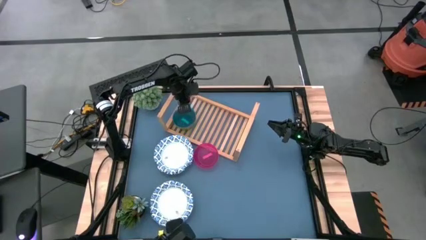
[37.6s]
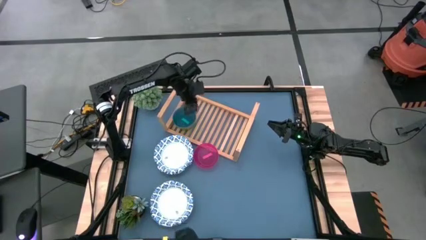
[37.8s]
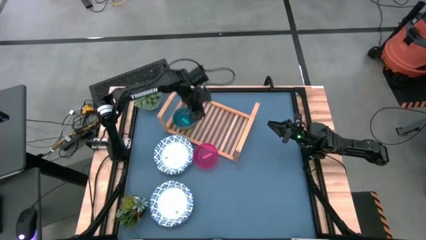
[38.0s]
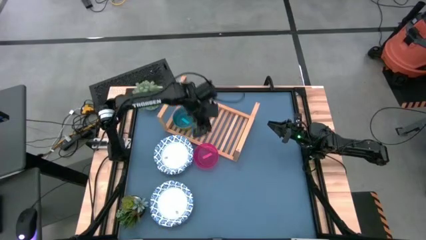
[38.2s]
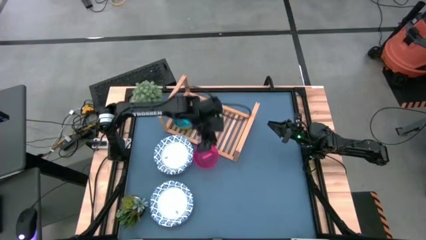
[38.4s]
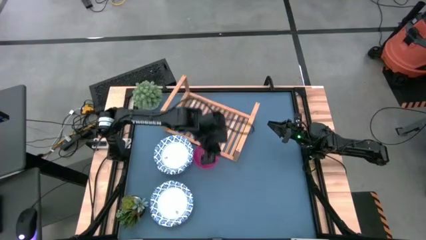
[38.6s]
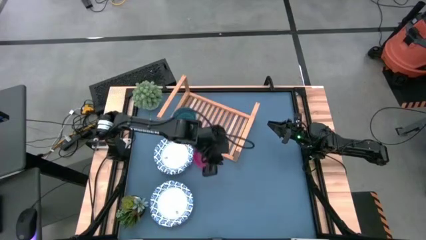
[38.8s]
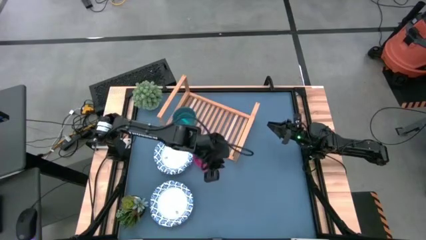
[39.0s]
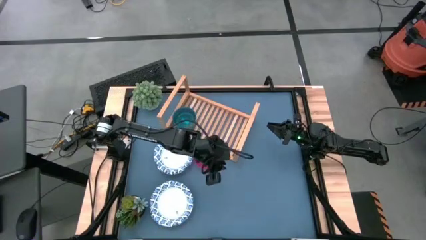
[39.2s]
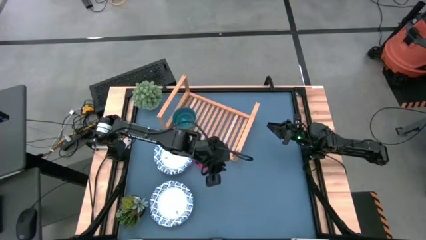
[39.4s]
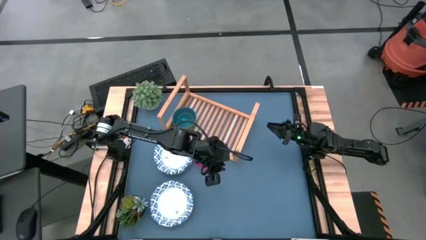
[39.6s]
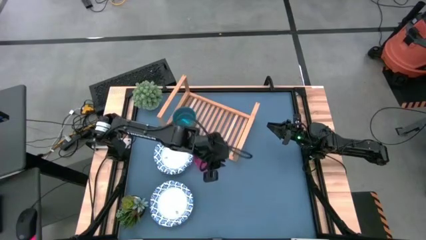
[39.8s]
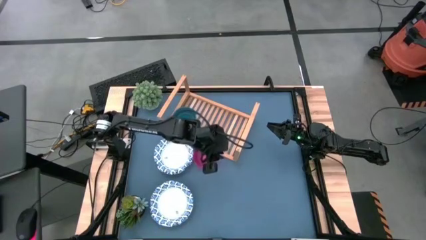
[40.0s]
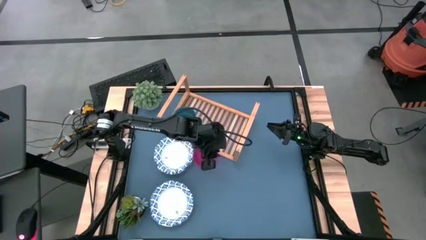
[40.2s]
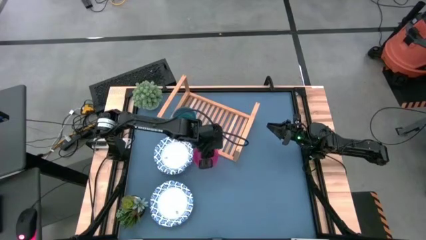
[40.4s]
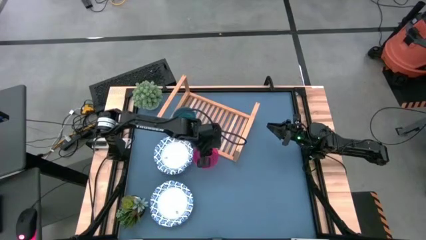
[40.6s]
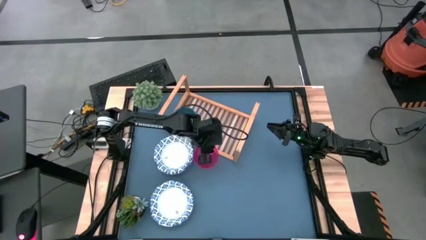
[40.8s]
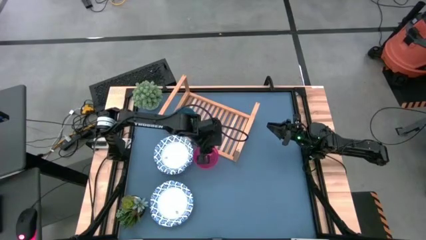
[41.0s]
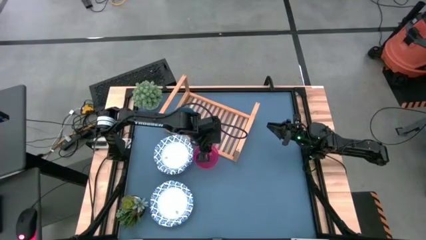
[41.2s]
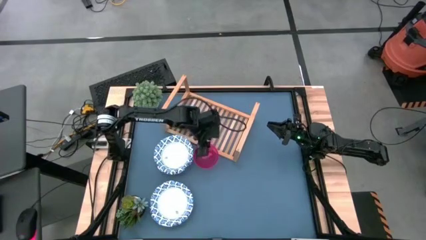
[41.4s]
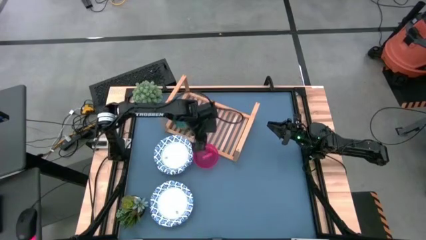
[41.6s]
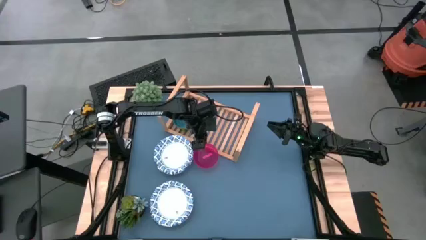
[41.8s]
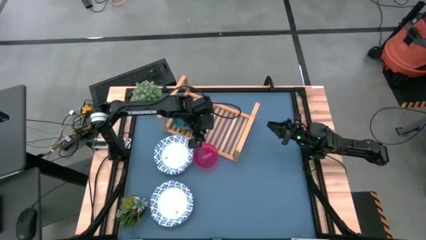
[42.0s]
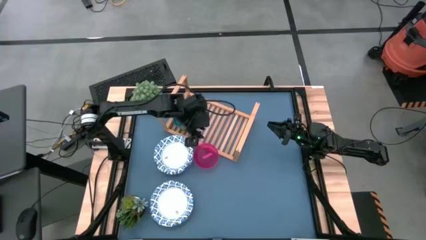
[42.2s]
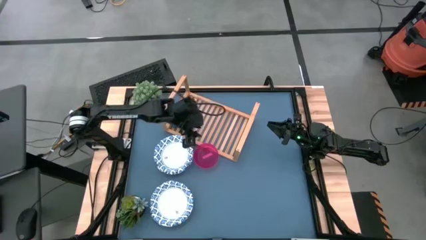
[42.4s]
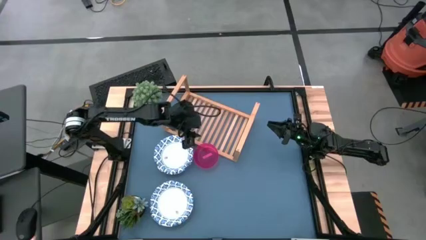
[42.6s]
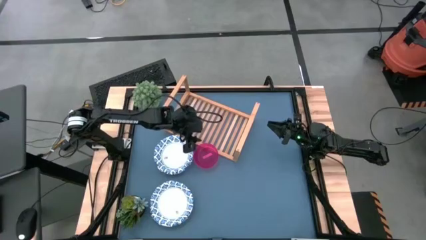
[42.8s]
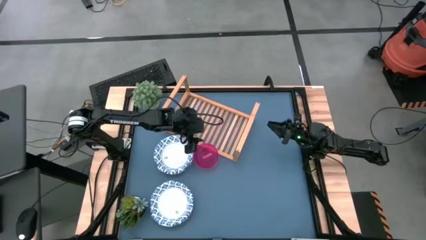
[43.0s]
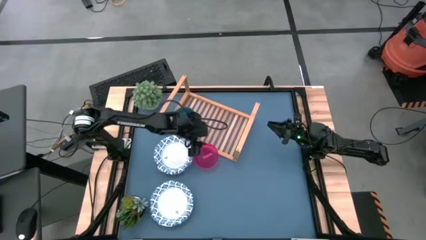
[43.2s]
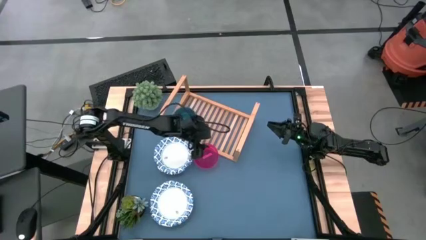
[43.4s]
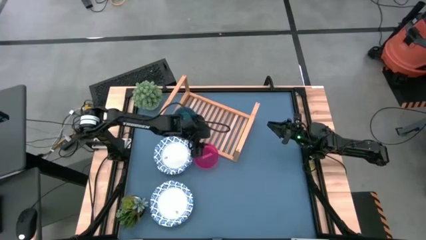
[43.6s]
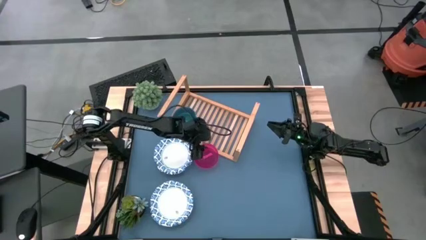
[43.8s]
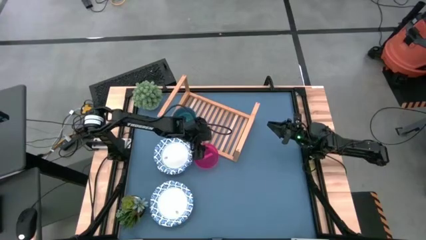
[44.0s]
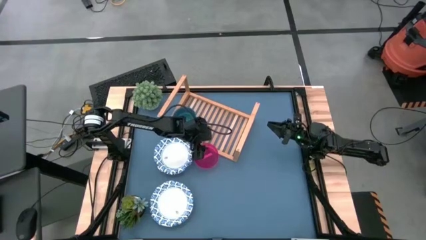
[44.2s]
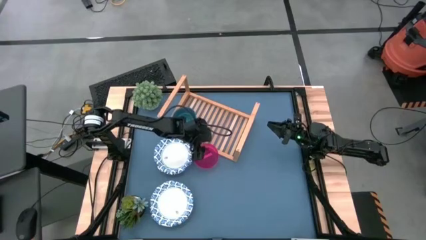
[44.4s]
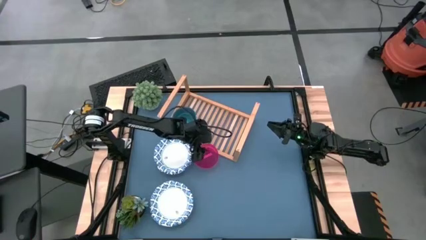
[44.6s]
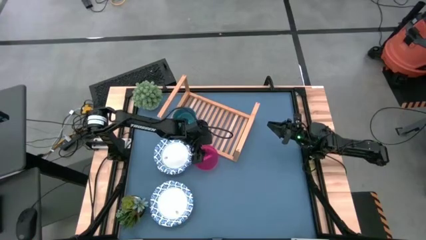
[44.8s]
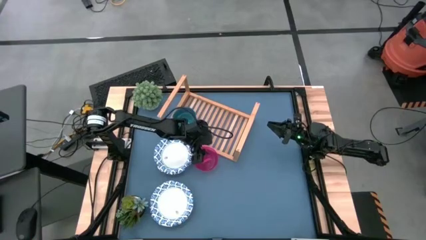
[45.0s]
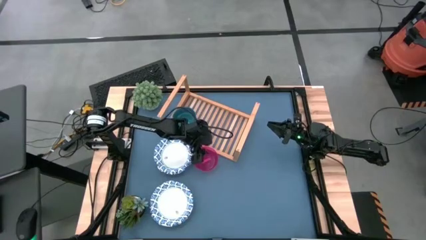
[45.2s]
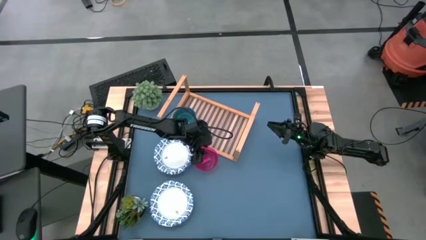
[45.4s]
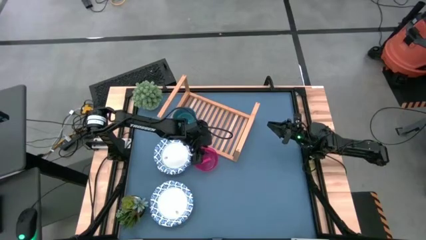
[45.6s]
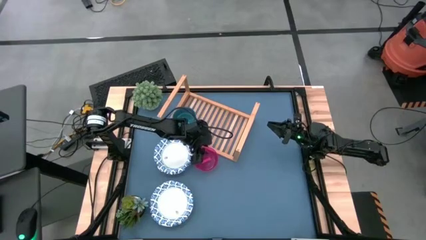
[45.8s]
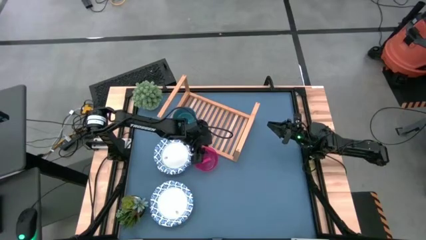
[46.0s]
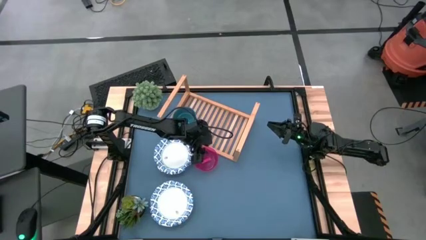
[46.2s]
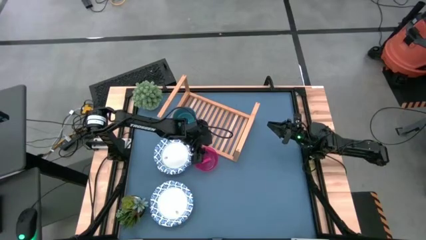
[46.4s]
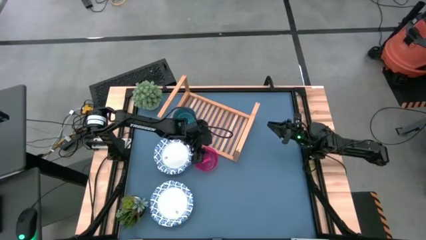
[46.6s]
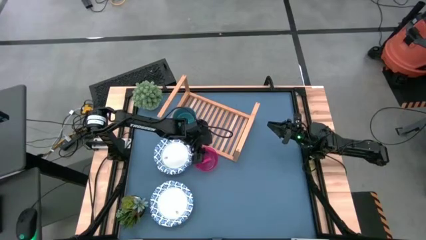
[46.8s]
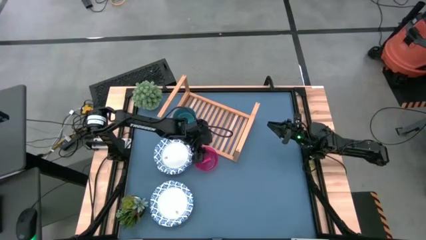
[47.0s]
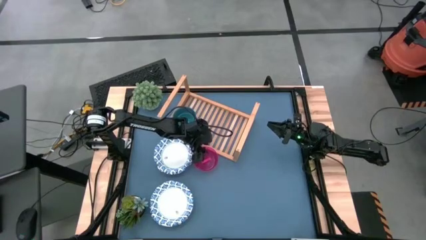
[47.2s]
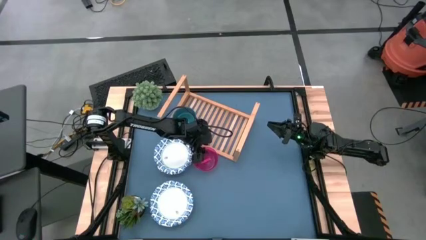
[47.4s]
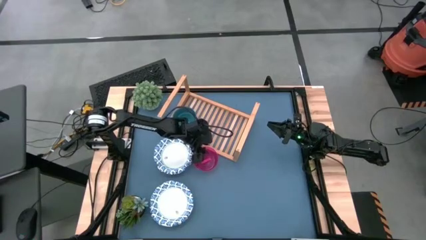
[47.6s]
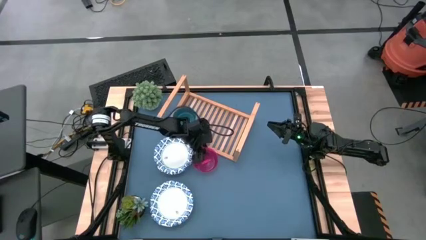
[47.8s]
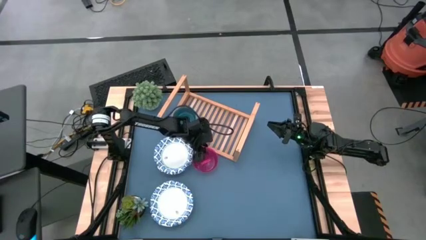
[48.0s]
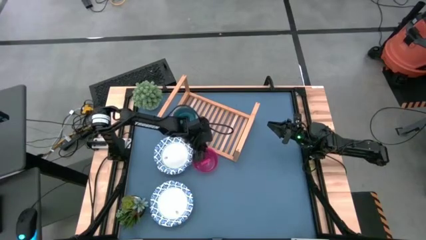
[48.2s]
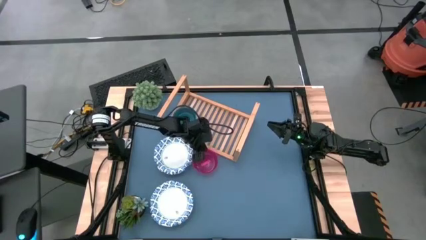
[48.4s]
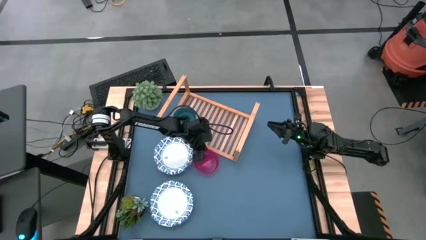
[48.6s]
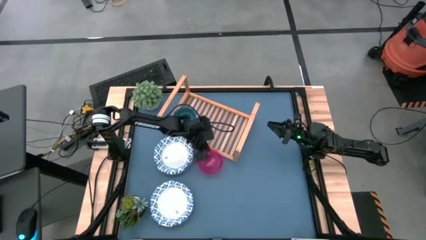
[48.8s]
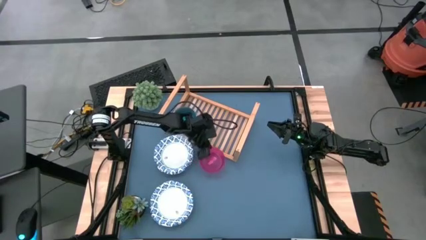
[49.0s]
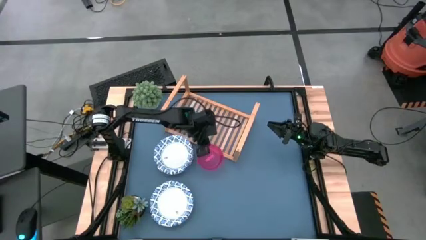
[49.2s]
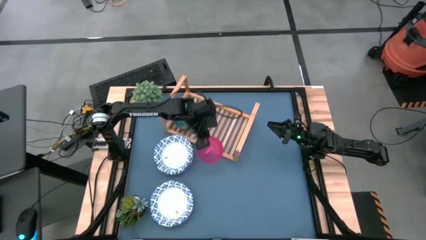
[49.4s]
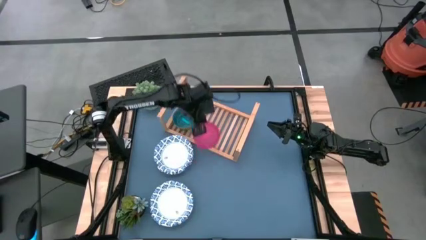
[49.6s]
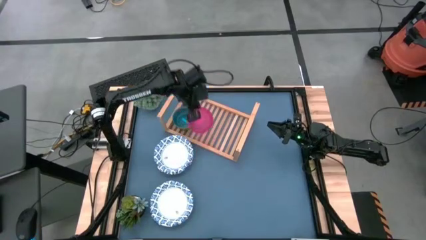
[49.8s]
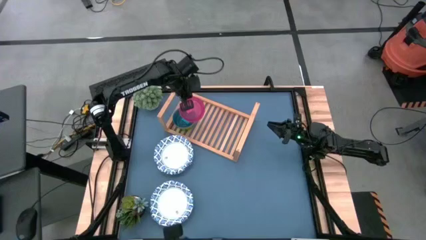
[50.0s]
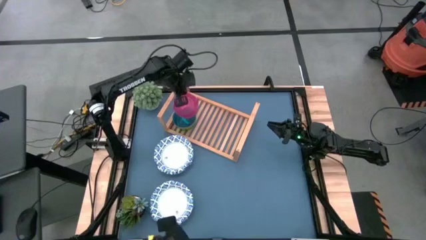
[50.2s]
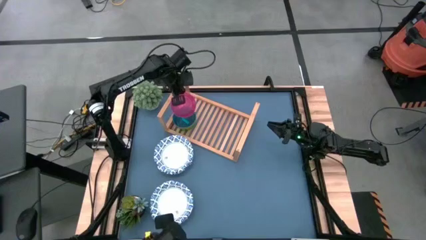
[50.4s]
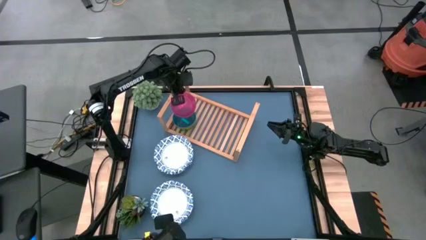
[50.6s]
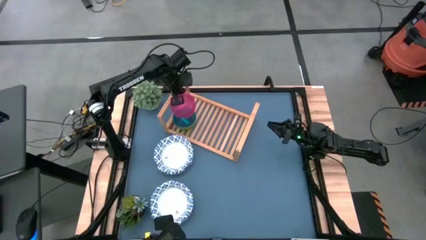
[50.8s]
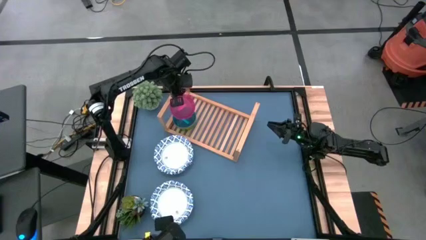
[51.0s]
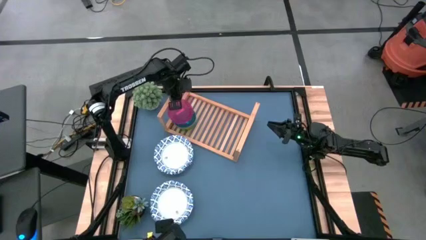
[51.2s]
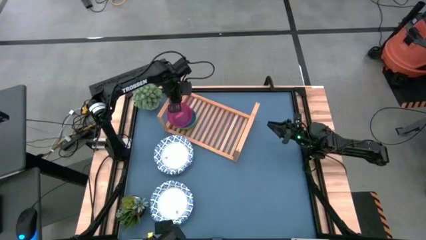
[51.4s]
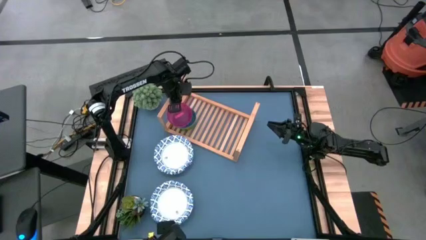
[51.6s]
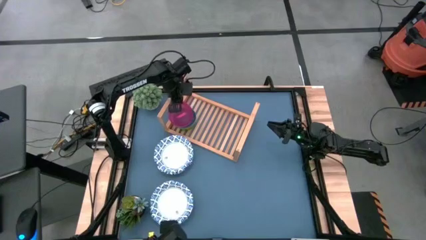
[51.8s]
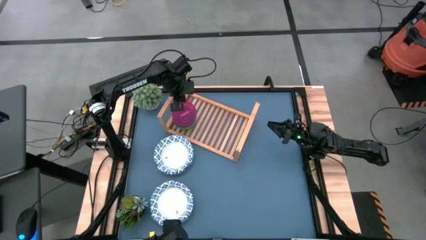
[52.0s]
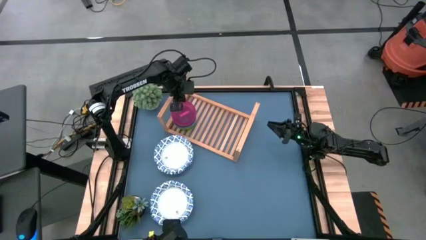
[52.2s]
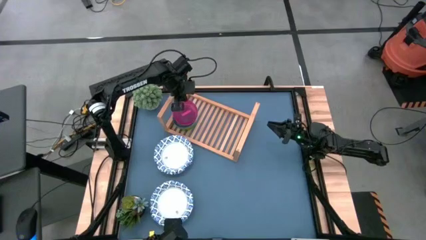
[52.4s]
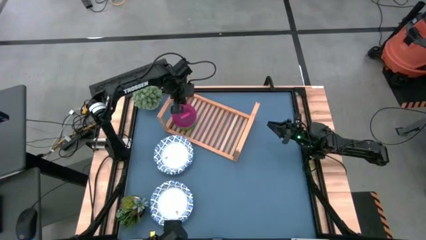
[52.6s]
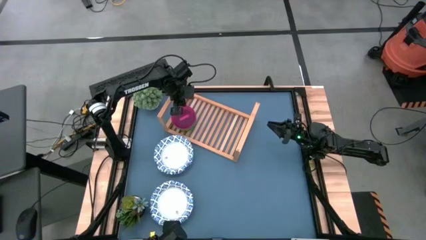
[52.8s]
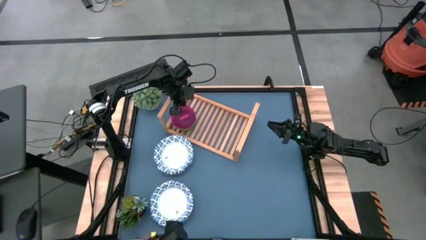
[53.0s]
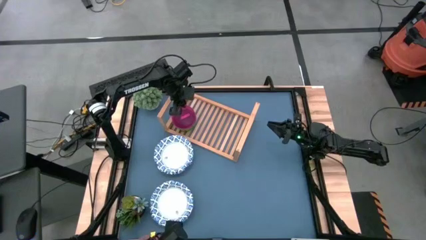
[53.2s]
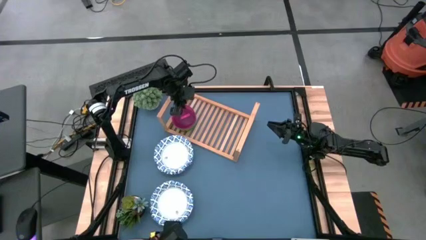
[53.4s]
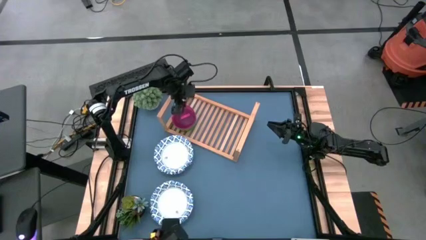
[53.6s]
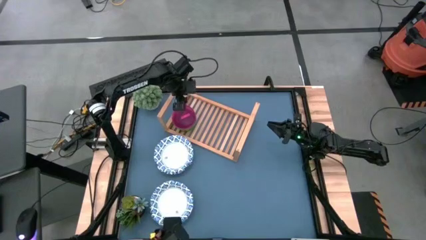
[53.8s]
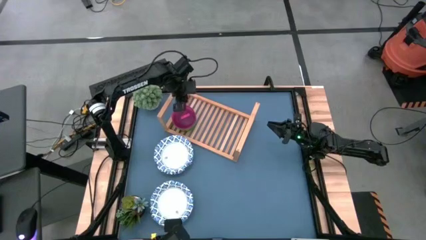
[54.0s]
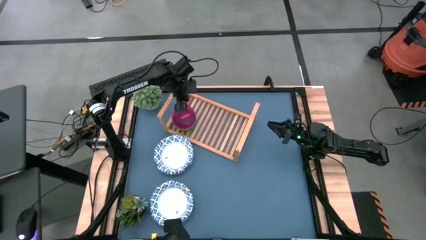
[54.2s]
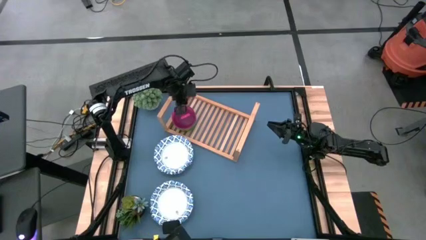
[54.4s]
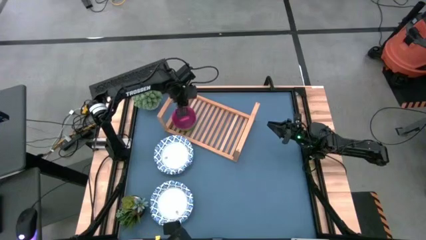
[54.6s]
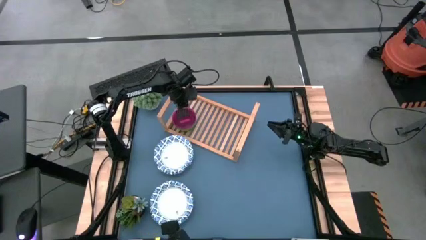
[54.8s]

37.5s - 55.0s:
Task: Place and stack bowls onto a shelf
Stack the small red bowl on top of the small blue bowl on the shelf
